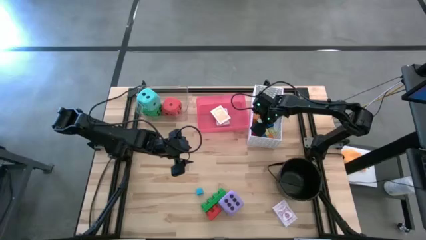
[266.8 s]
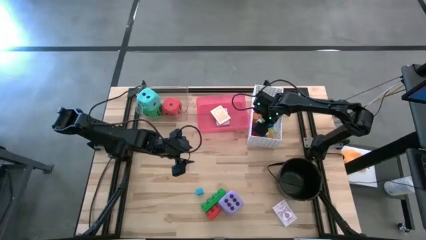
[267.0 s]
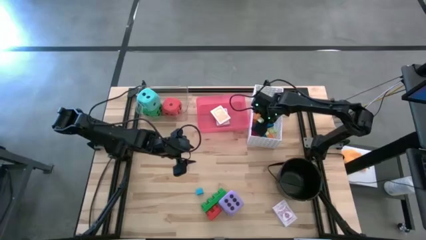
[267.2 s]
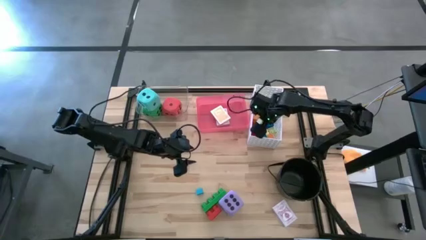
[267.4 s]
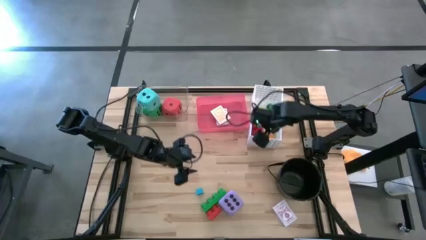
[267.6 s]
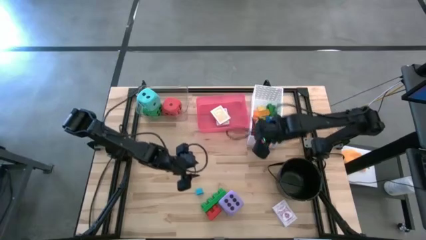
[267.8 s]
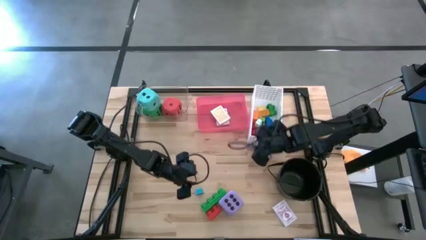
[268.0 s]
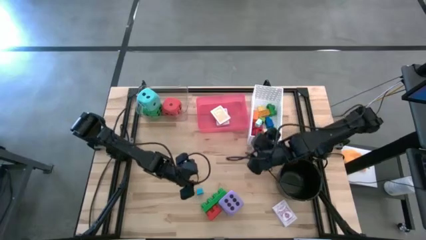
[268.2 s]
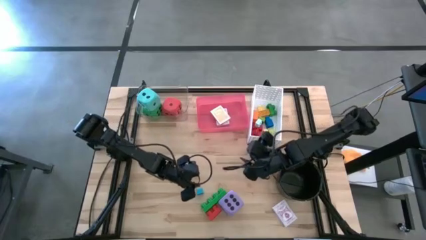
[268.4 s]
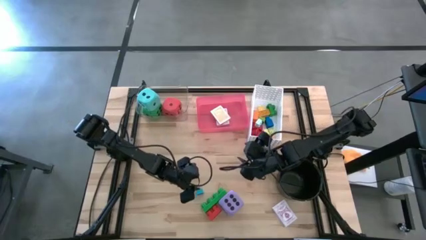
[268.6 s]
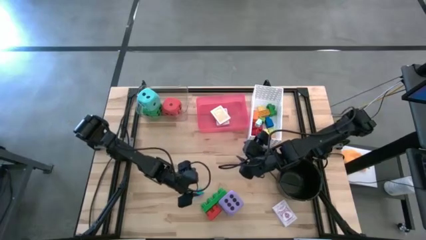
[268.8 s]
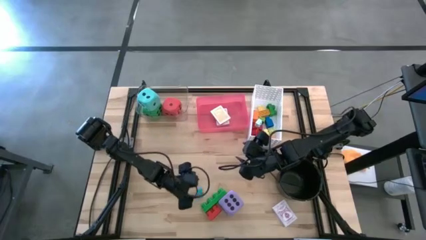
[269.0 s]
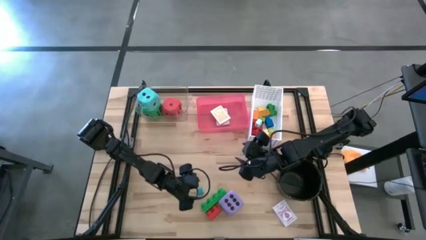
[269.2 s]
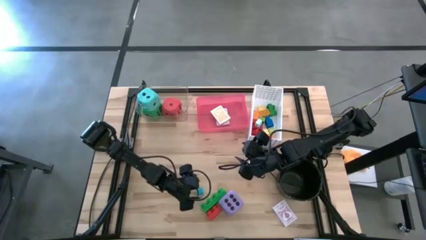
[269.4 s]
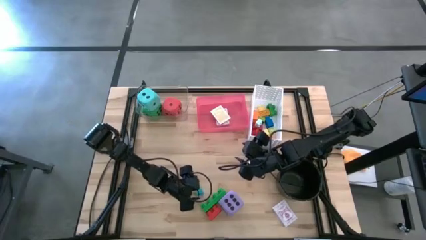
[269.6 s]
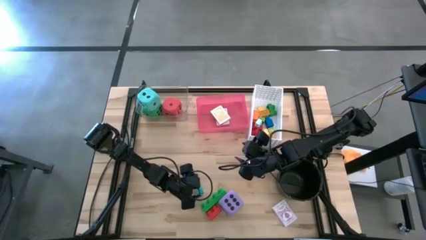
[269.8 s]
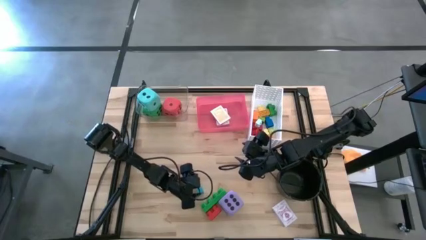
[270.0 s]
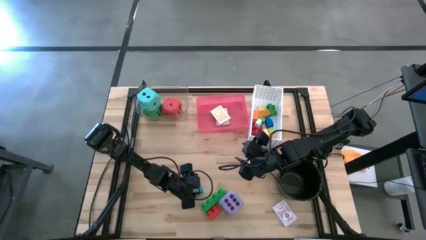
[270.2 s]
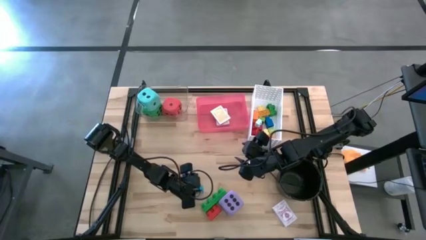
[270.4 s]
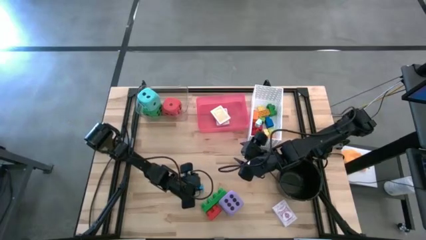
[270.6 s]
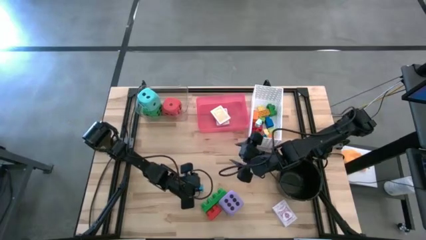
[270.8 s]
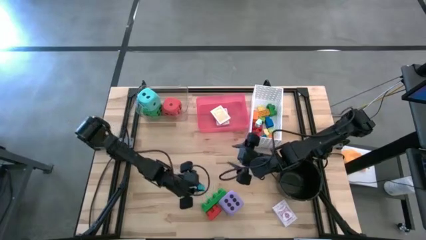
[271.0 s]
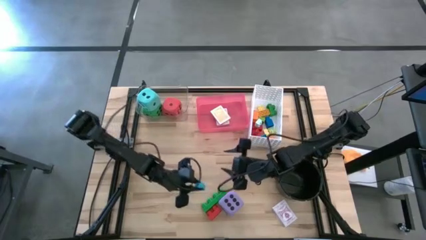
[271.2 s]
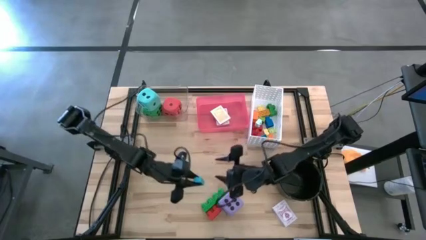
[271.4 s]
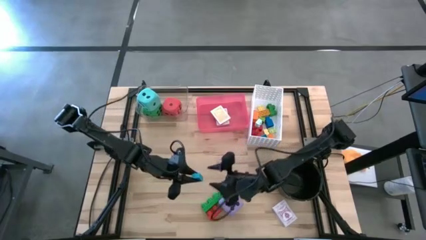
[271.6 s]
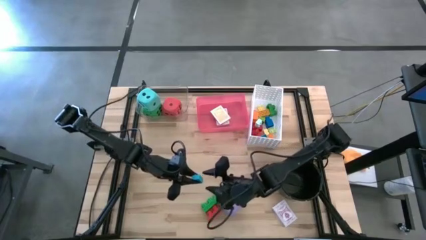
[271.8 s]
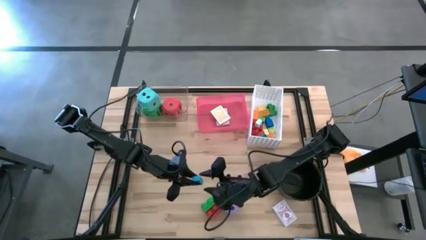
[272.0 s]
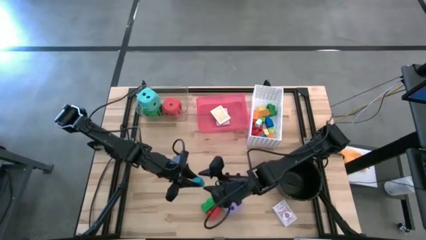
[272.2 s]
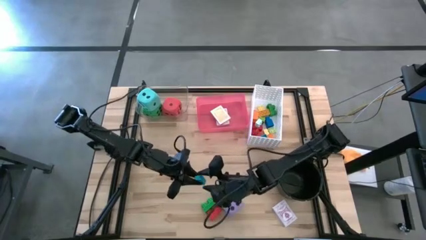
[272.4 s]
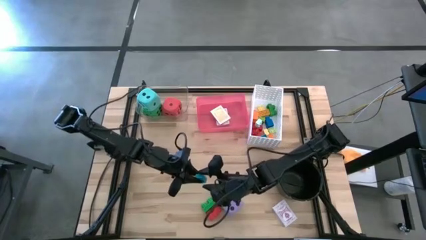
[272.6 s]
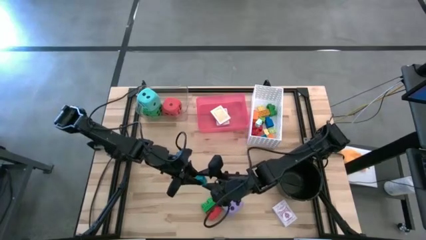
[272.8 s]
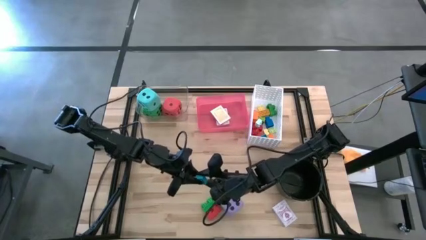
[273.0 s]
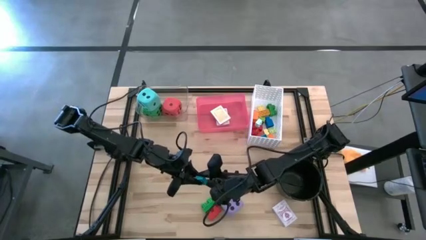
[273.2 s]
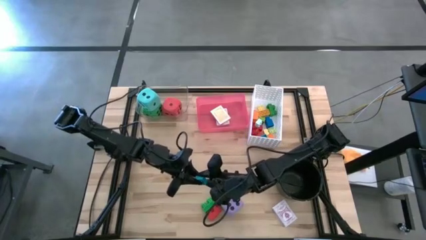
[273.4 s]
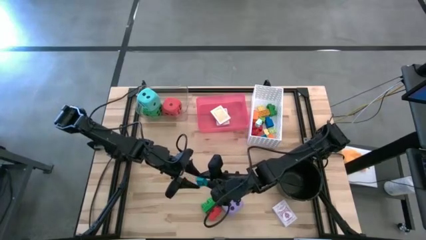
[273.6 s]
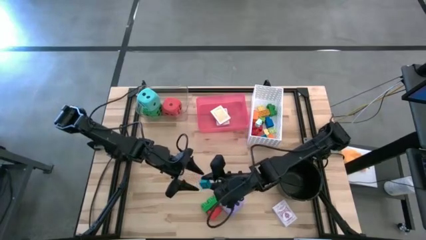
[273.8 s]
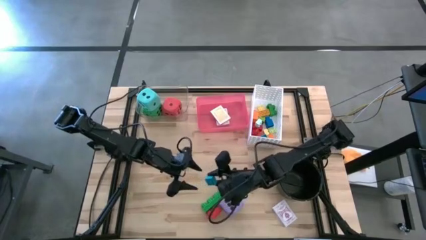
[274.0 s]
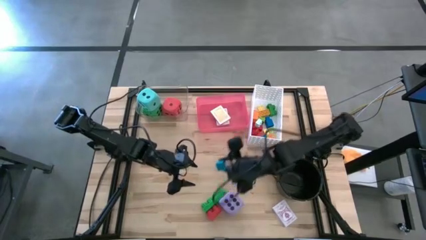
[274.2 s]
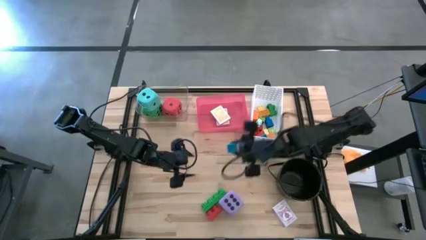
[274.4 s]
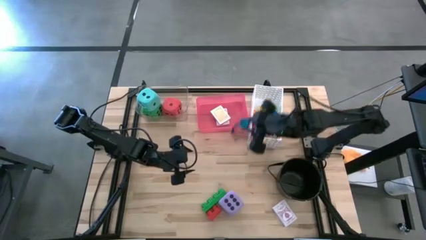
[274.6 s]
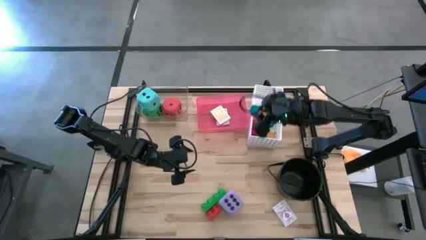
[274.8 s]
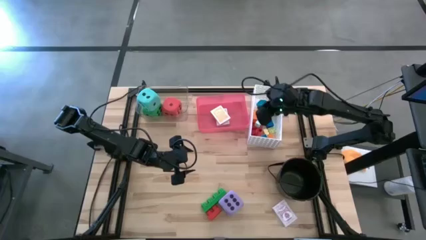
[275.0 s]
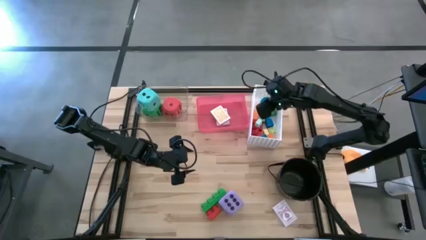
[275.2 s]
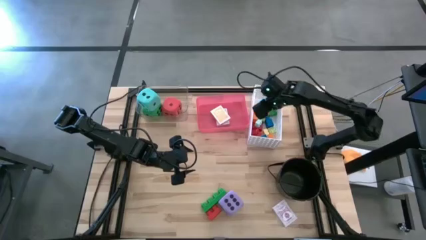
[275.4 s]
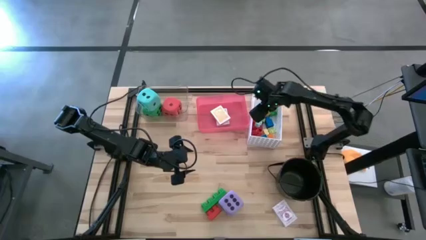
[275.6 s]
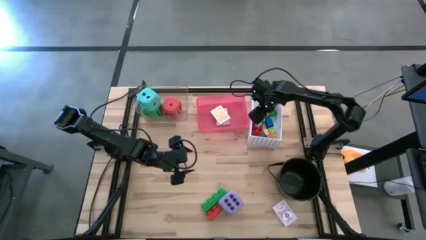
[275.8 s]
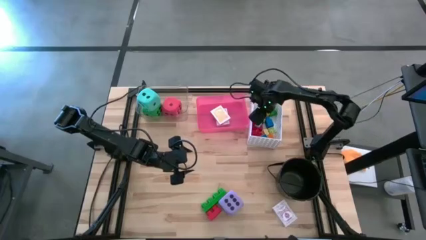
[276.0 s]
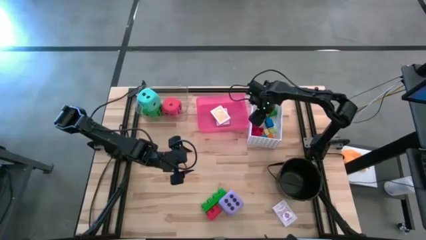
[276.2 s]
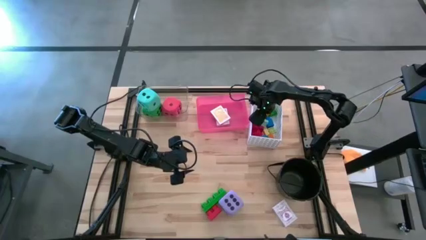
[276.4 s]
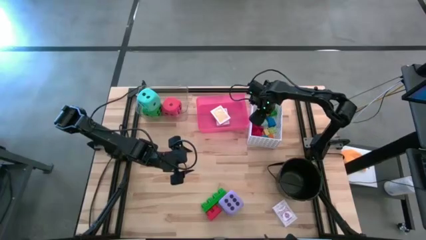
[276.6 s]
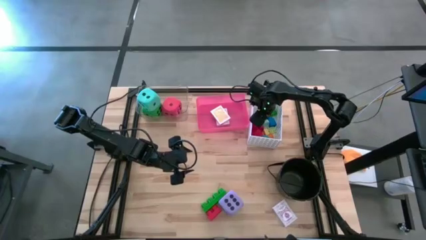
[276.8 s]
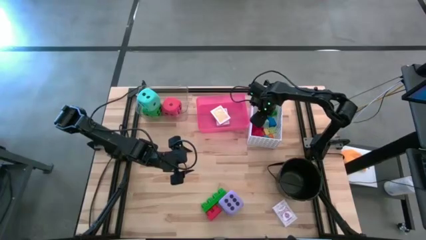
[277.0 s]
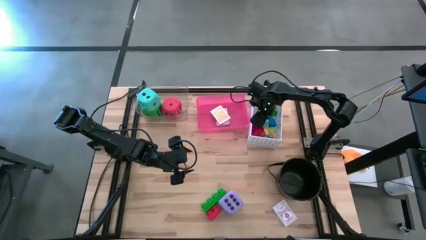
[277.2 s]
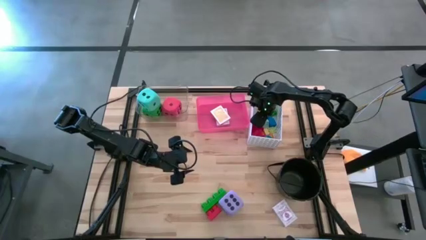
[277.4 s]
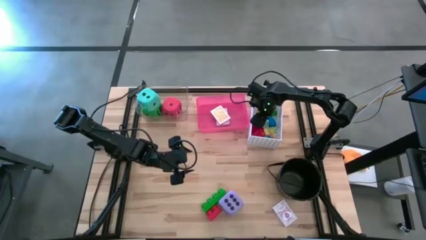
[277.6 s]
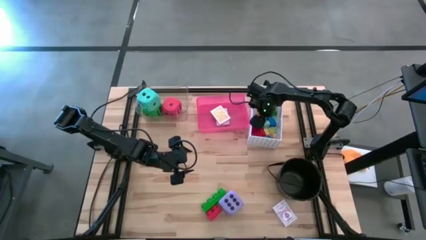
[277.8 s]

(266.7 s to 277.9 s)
Task: Pick & Place Toys
Put the small blue game piece into the white bin

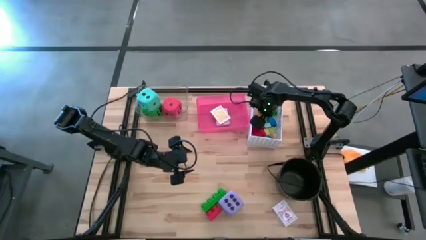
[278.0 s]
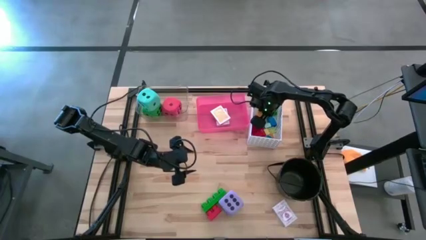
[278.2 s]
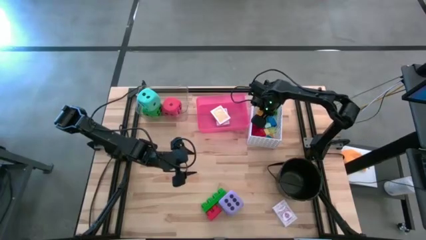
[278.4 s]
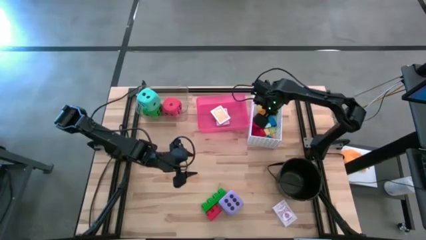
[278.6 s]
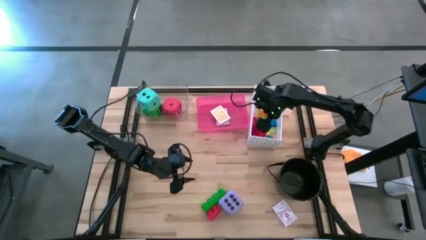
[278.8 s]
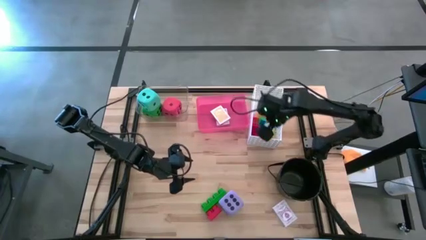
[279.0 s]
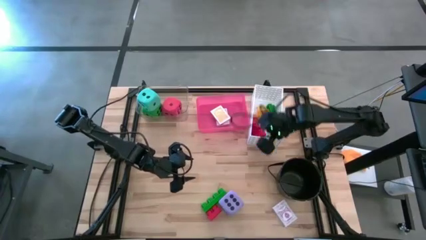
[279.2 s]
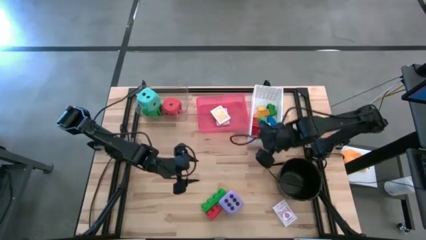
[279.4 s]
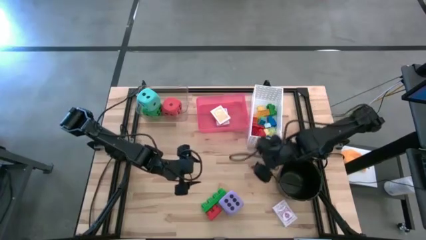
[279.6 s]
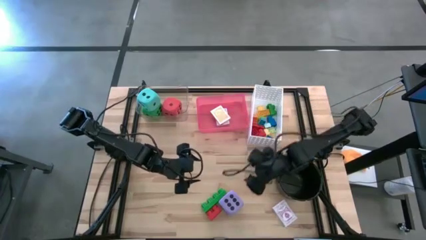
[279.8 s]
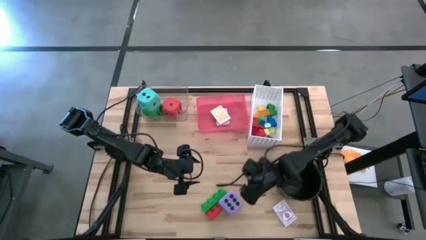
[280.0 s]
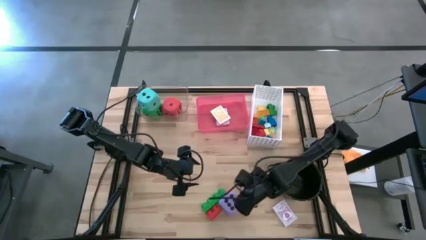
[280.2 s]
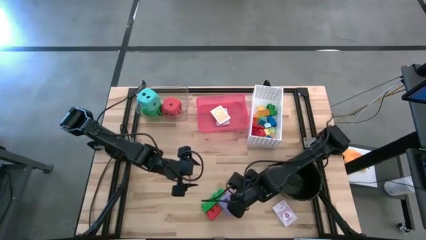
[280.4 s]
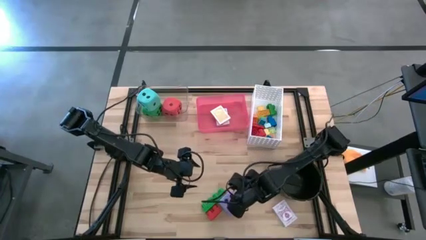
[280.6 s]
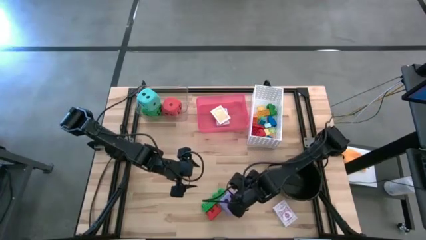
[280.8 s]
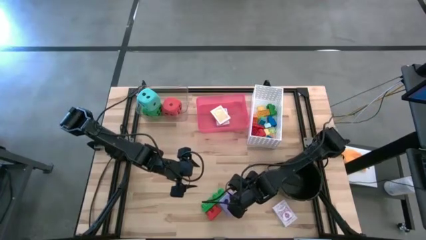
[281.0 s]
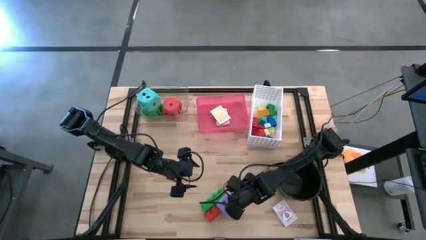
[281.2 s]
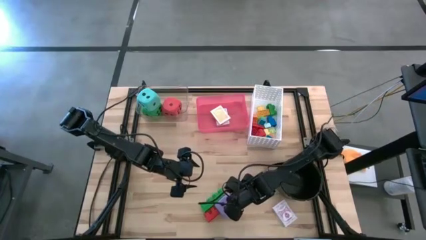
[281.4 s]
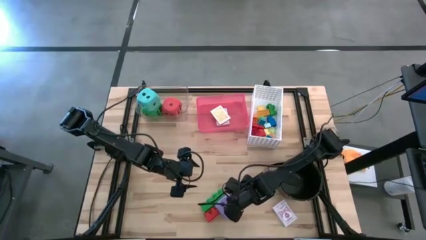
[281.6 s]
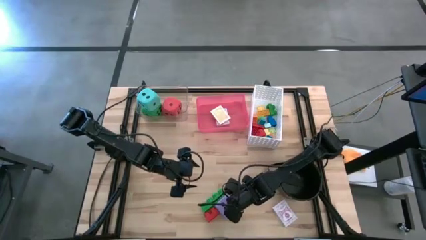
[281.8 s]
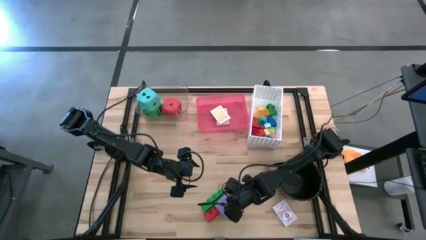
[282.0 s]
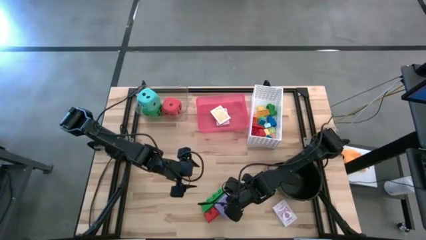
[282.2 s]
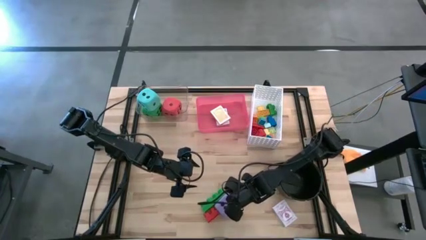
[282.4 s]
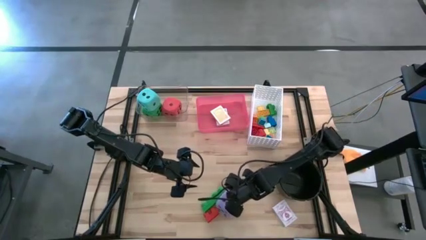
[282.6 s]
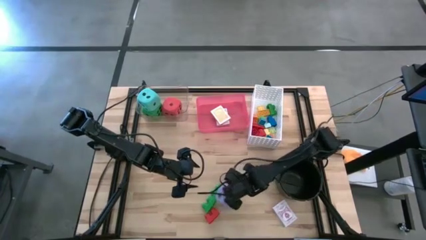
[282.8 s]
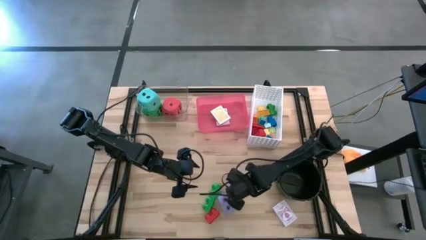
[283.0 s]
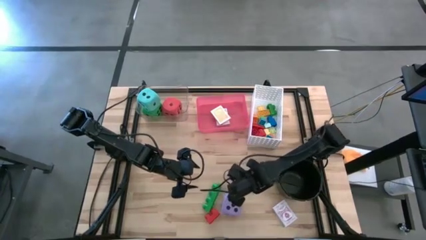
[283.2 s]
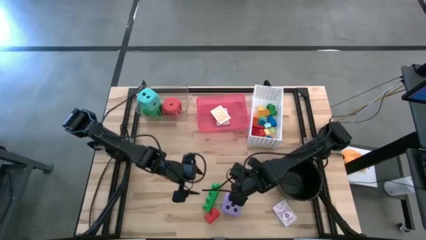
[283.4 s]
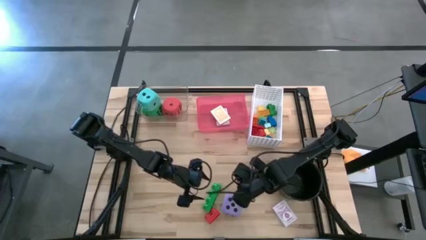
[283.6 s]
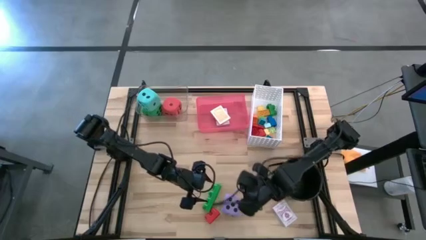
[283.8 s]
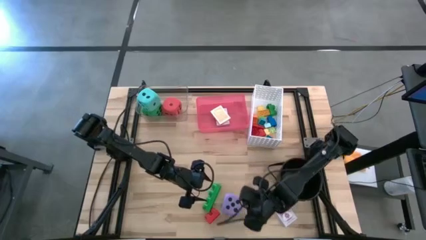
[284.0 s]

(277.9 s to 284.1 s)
Put the purple die into the transparent bin
